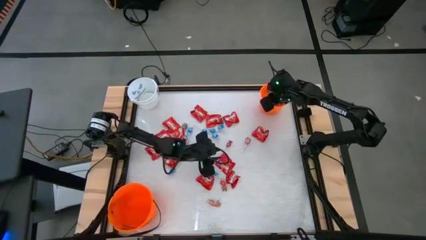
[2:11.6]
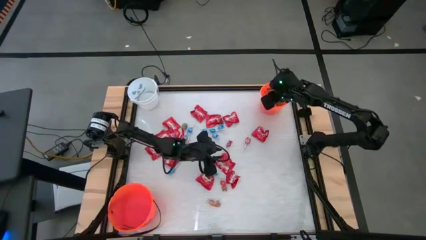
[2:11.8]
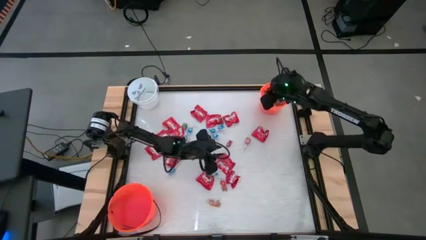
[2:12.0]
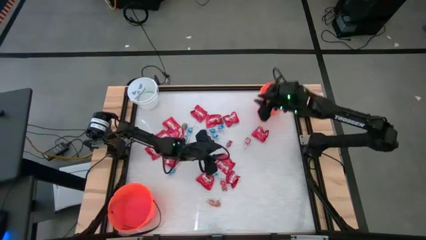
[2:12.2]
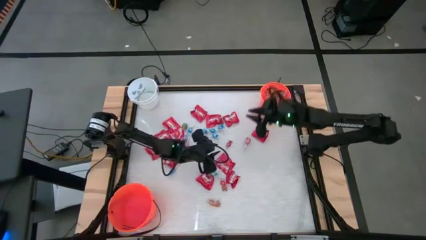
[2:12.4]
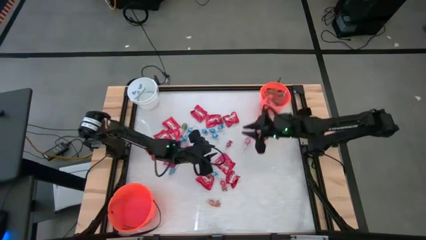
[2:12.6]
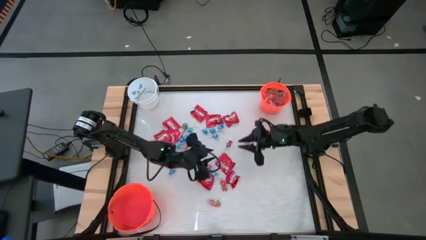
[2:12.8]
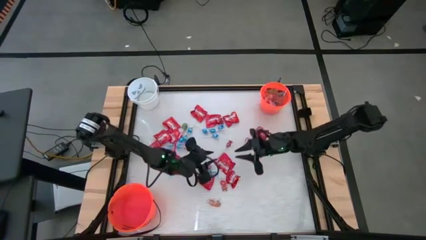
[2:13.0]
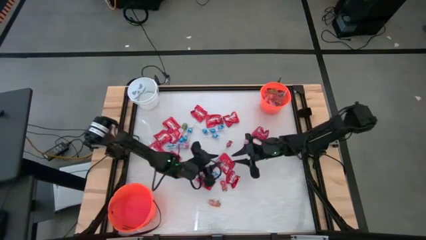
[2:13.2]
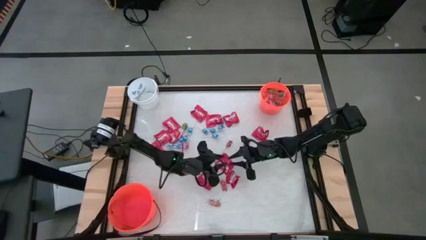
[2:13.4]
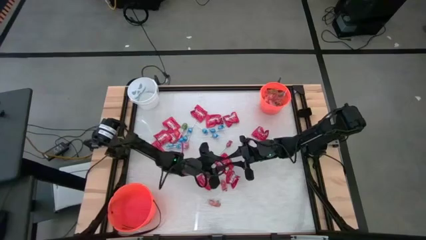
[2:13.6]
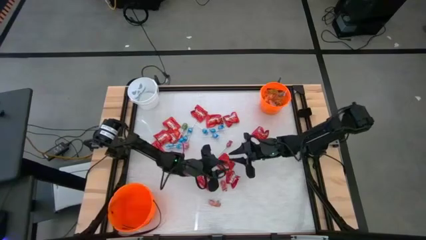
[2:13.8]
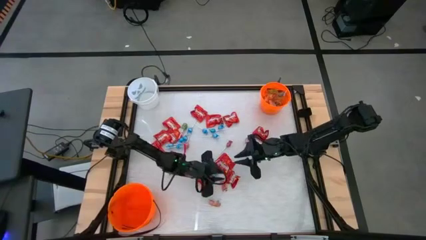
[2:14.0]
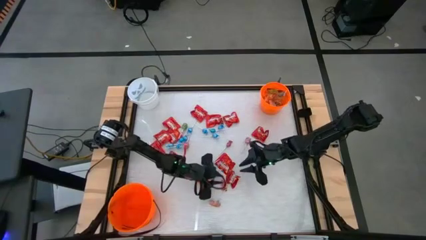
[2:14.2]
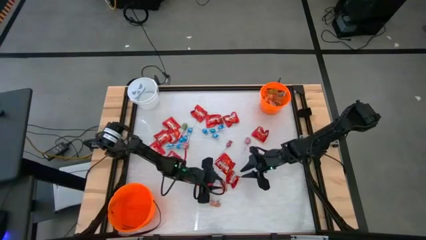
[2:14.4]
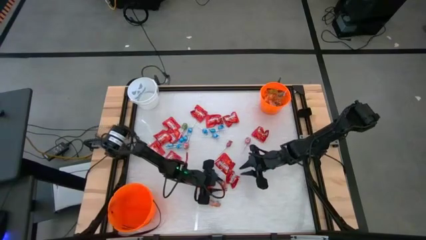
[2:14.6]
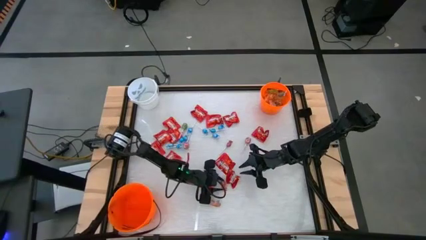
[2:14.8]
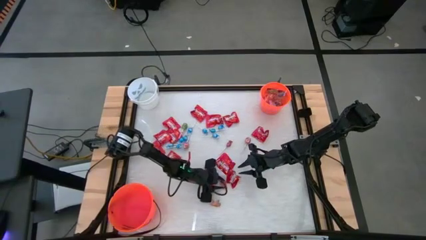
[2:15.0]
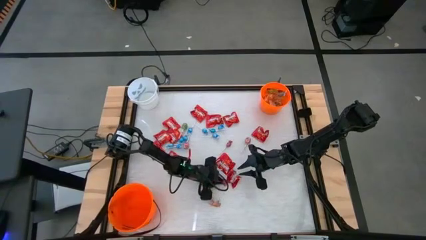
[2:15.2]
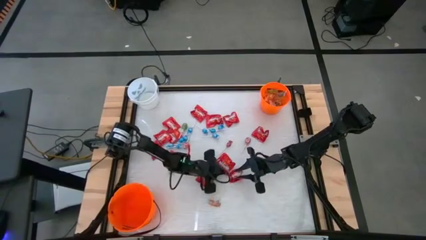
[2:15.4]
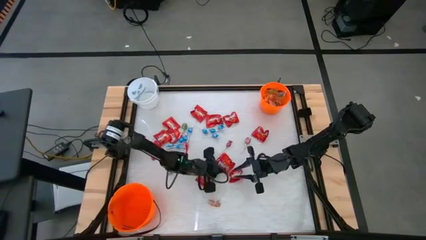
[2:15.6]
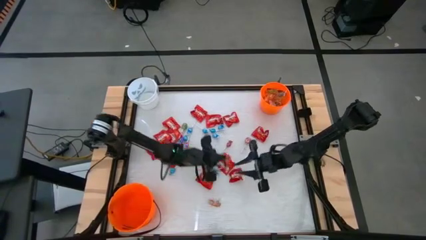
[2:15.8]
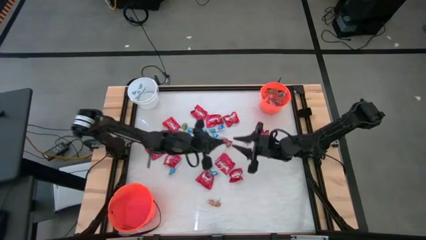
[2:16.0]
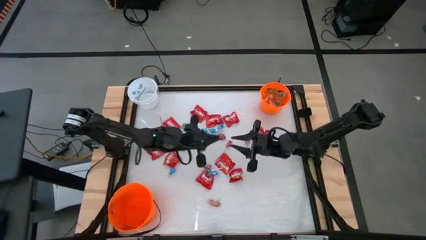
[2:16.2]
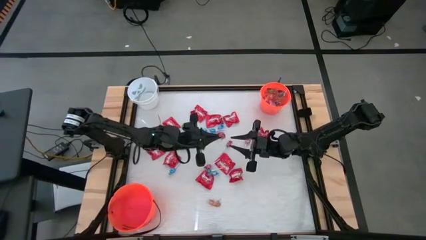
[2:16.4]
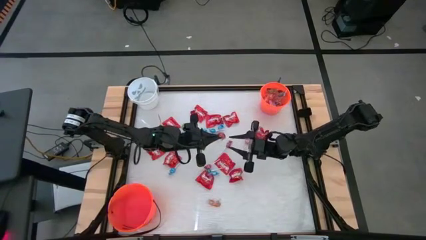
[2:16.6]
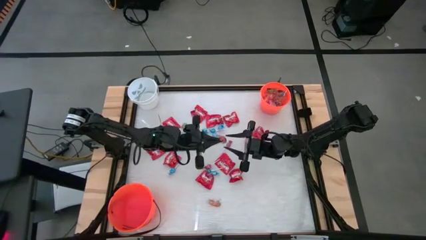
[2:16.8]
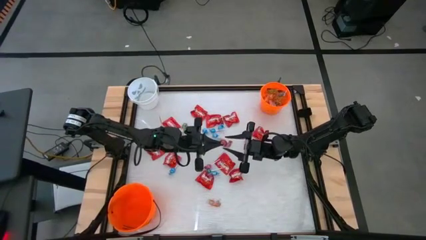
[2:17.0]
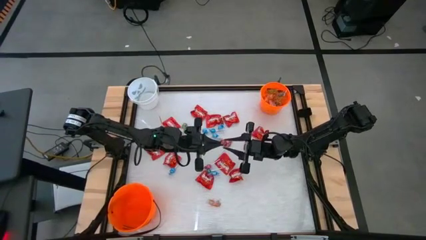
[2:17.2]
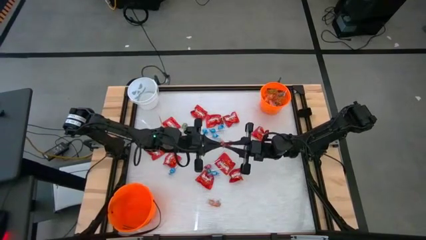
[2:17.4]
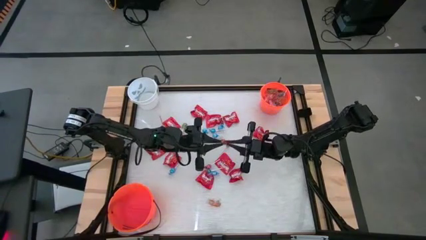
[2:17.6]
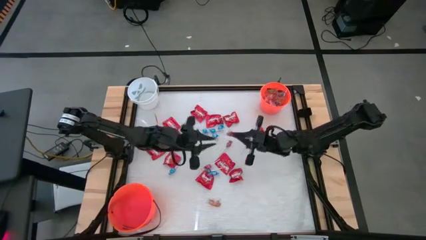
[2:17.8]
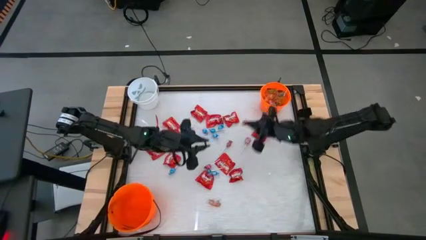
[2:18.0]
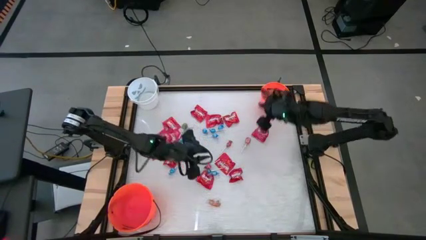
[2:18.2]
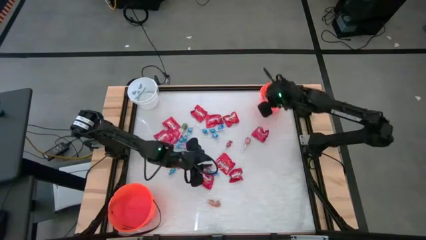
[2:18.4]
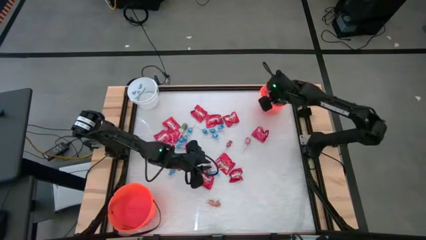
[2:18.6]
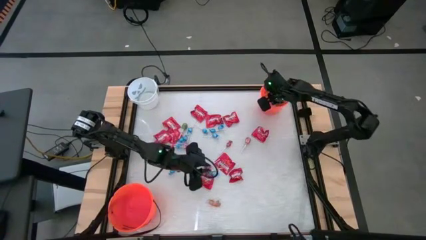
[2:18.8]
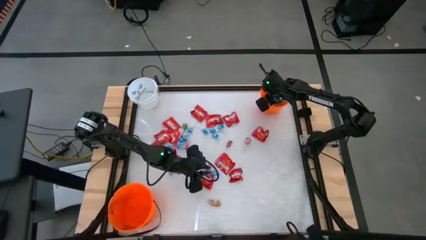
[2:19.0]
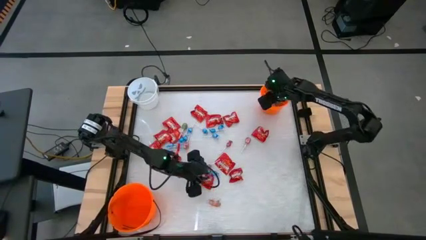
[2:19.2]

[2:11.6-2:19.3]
Task: Sort candy by brand, put in halloween buckets
Put the red gummy into the top orange bucket

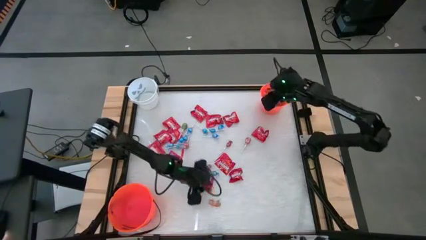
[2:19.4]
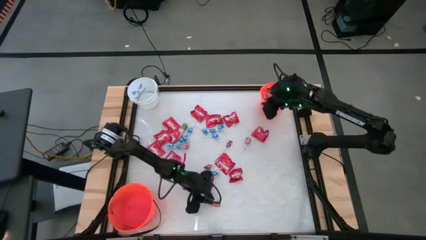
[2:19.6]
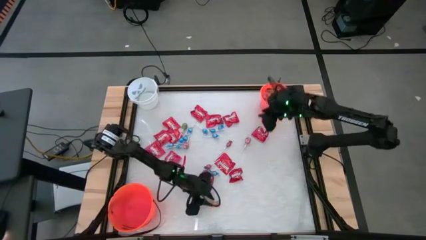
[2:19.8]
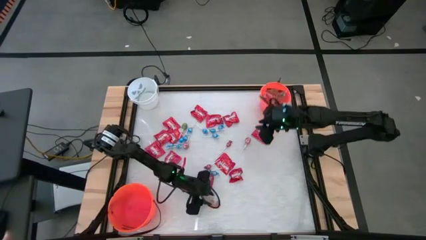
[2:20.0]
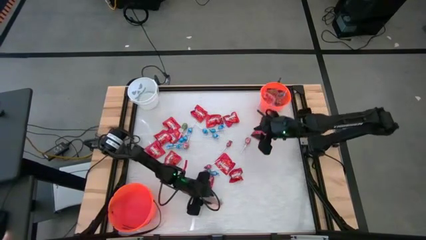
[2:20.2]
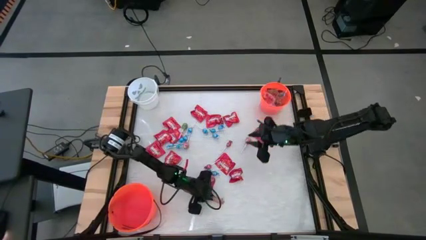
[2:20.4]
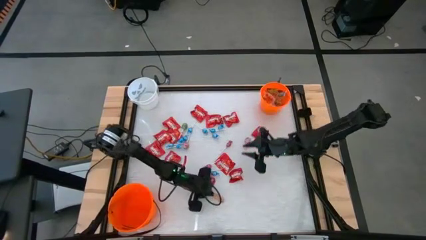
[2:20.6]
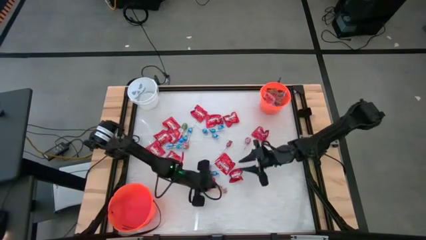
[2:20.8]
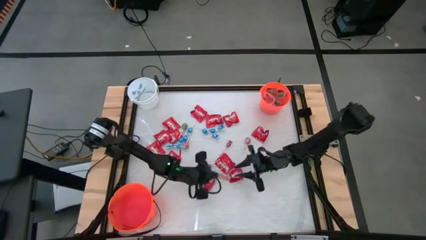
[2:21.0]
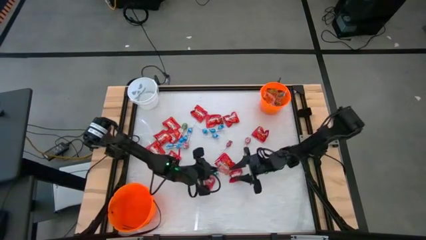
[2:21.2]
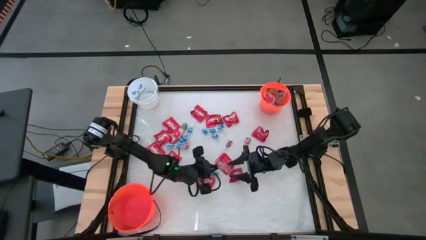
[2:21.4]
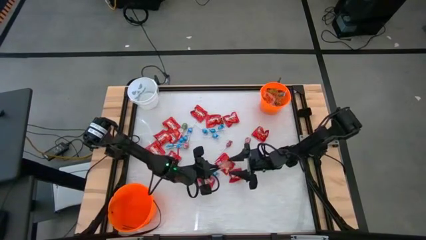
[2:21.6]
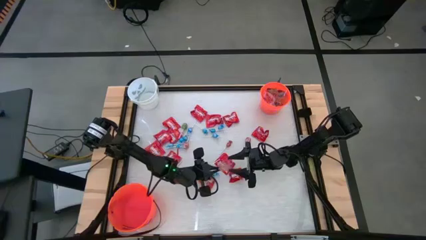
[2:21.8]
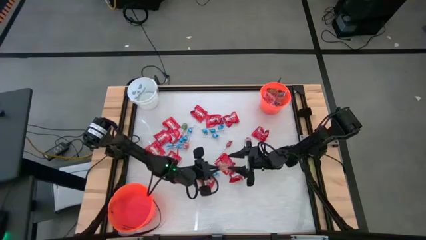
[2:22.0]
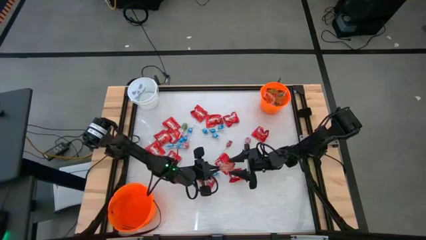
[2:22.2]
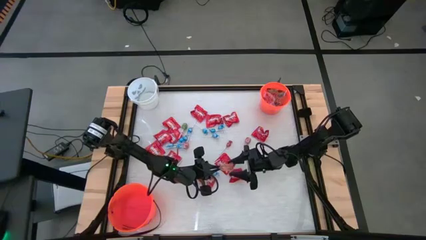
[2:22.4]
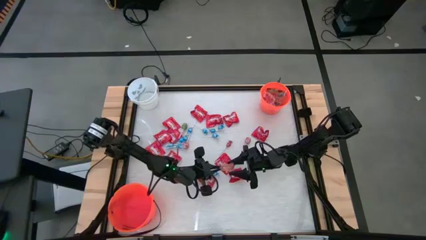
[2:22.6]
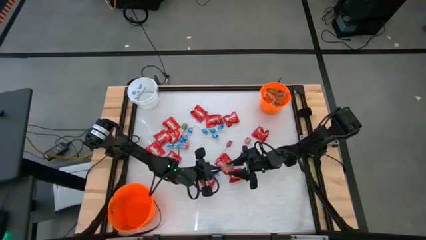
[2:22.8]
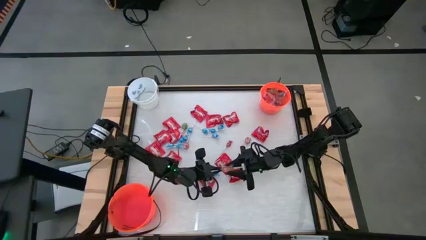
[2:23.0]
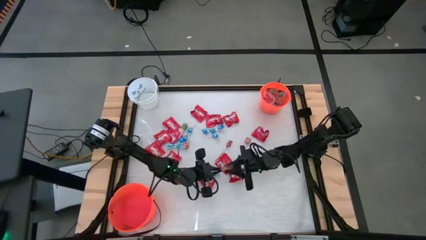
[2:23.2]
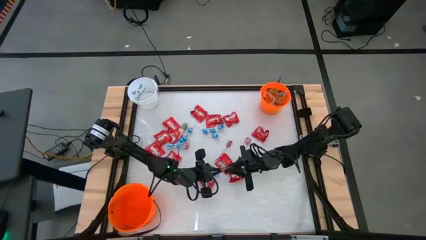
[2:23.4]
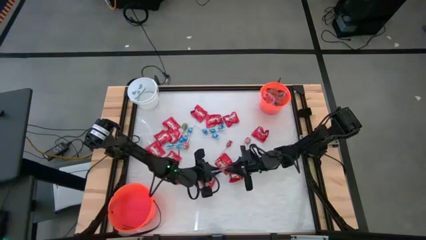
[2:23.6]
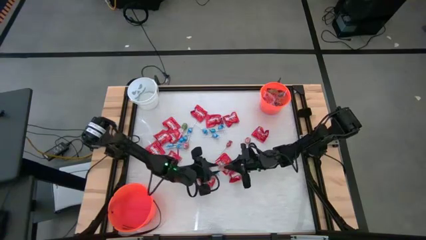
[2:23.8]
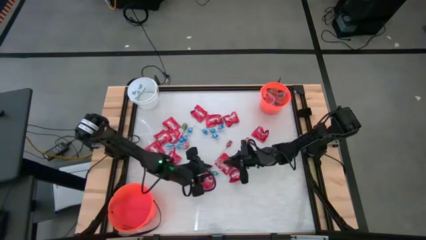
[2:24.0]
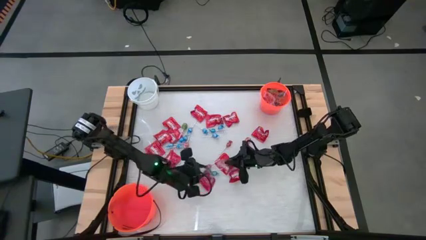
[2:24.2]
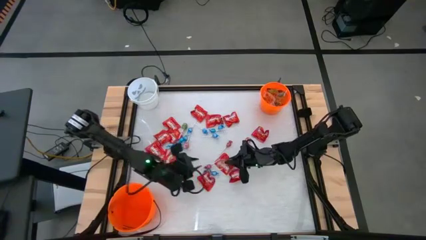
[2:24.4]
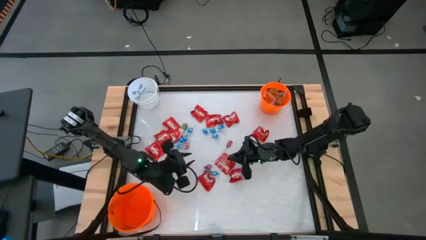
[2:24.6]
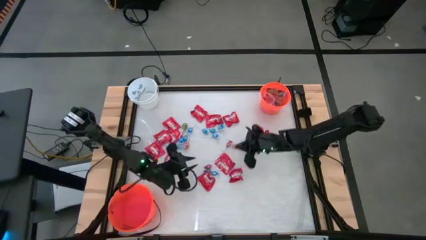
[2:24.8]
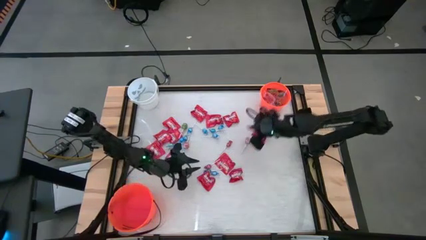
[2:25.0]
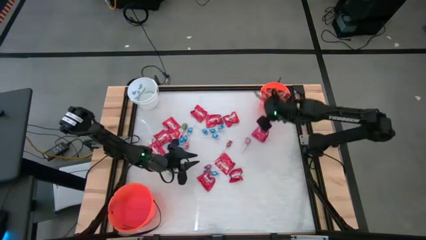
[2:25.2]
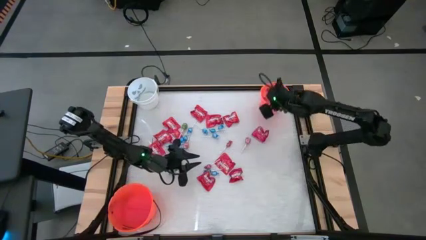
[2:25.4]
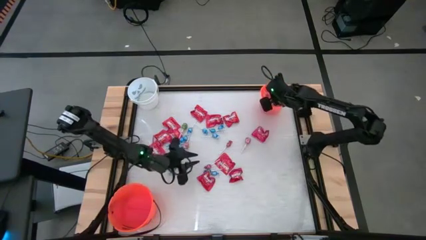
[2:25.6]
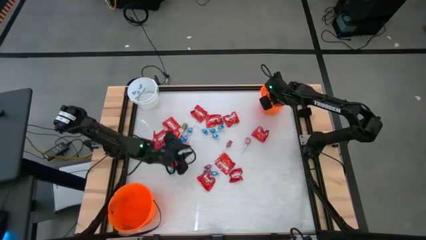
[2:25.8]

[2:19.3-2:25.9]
Put the orange gummy into the top orange bucket

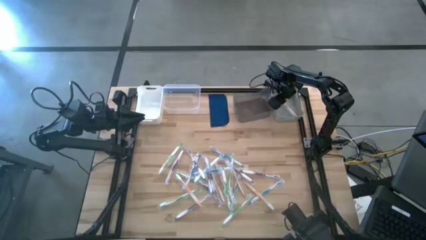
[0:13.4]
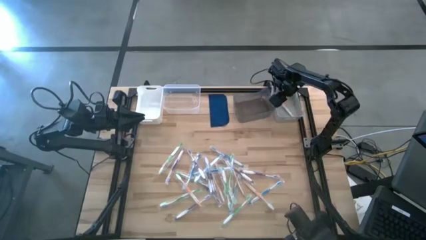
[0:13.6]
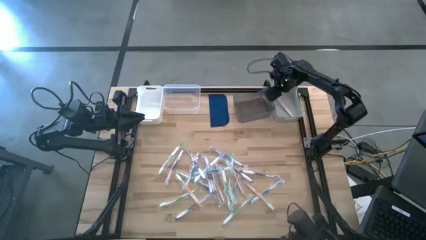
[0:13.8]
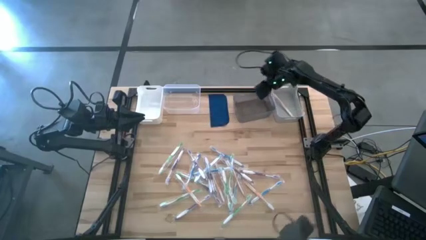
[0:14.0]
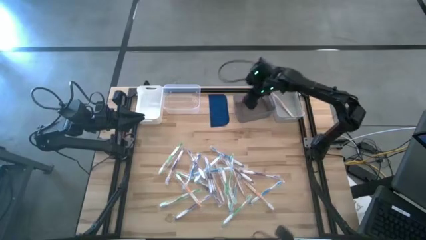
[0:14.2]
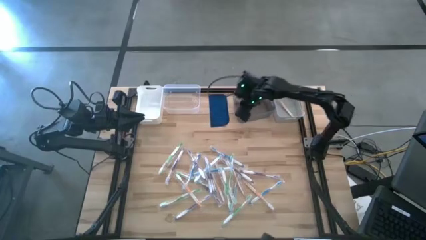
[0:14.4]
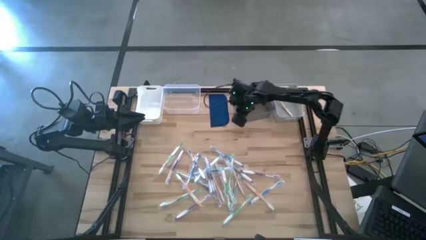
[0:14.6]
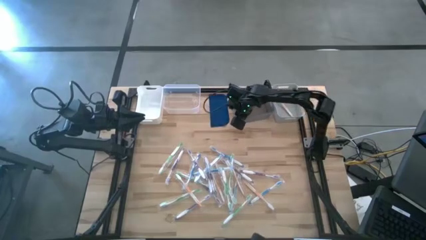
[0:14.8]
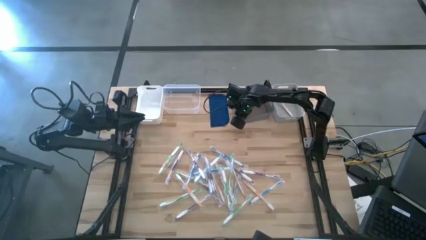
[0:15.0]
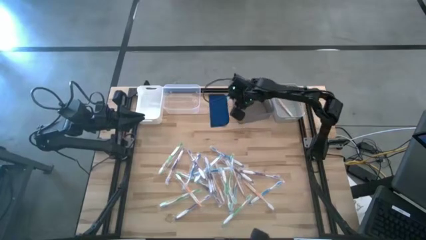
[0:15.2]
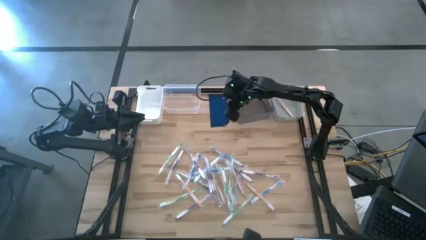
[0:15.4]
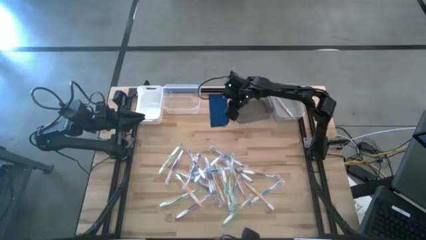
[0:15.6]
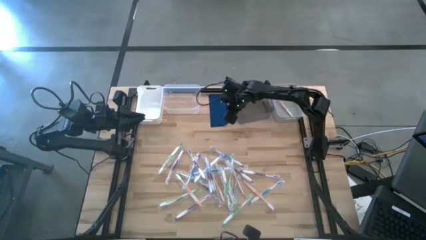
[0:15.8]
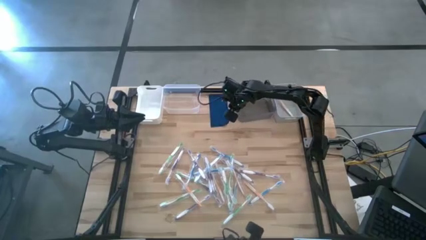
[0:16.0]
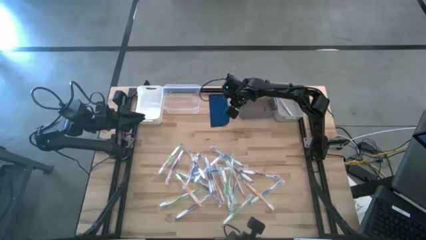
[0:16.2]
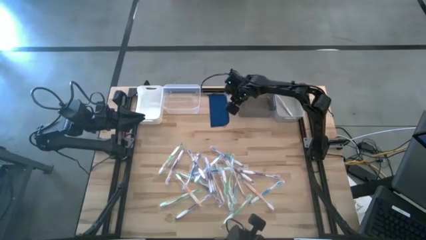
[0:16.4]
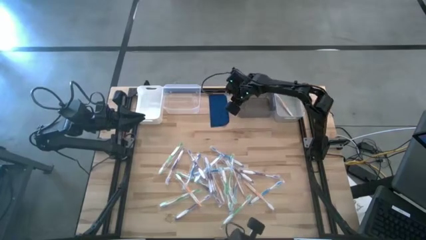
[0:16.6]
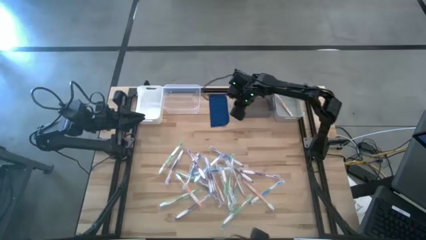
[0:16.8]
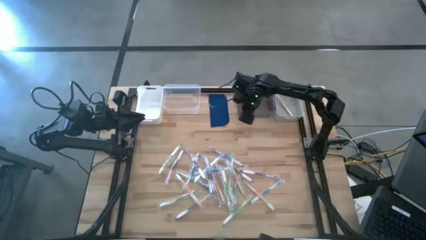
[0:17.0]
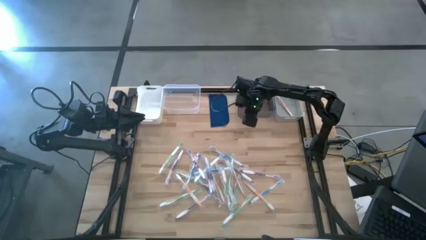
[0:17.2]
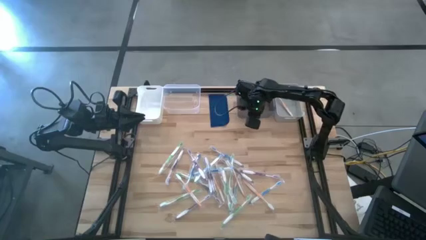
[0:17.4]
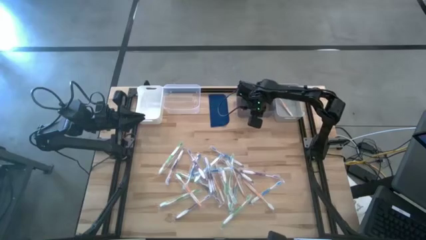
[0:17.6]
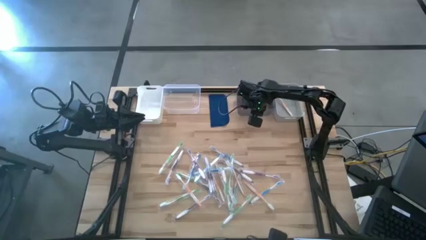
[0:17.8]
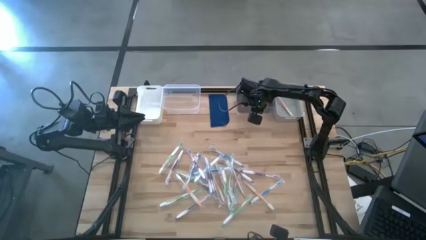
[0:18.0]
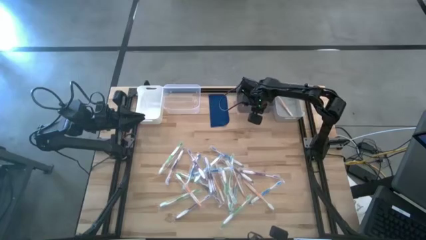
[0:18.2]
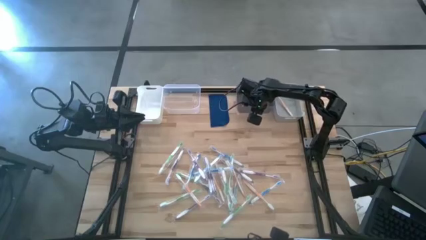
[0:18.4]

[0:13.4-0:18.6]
Task: Pick & Place Toothbrushes
Adjust the black bin on the table
